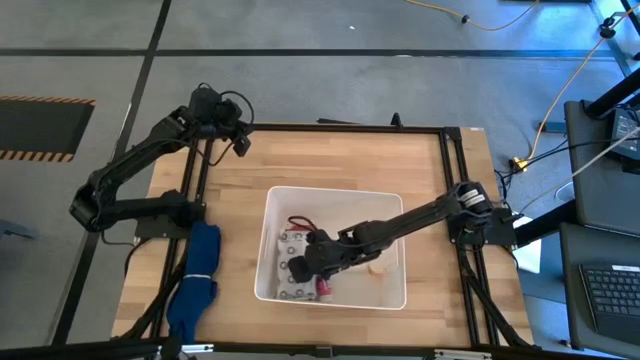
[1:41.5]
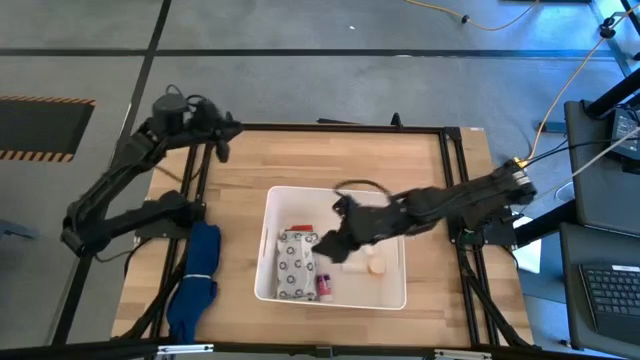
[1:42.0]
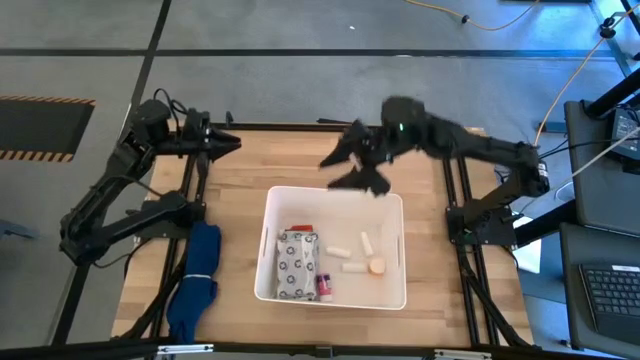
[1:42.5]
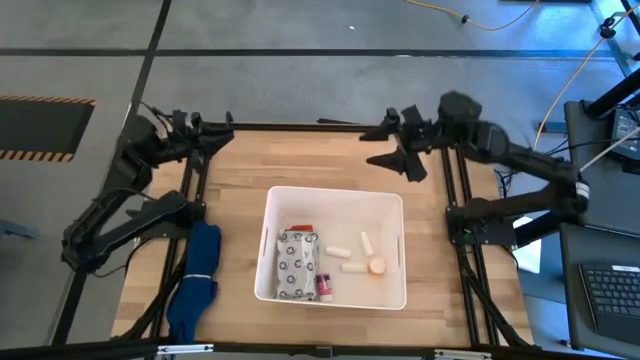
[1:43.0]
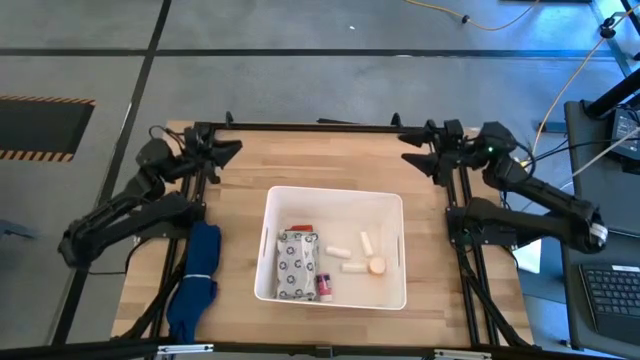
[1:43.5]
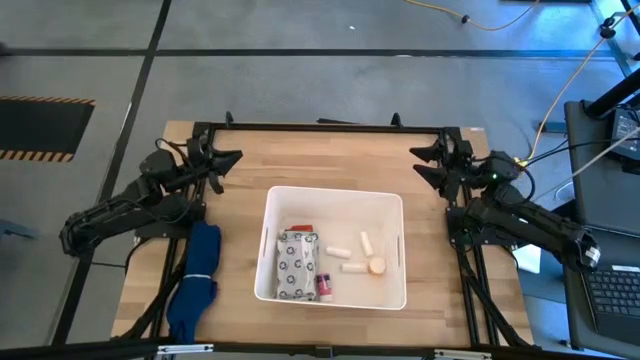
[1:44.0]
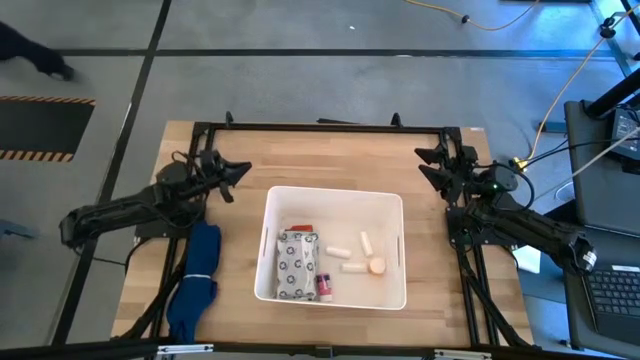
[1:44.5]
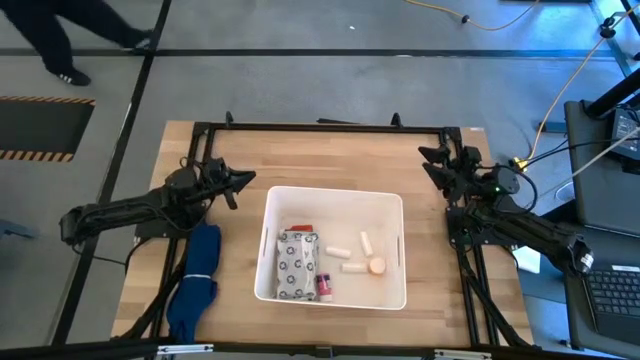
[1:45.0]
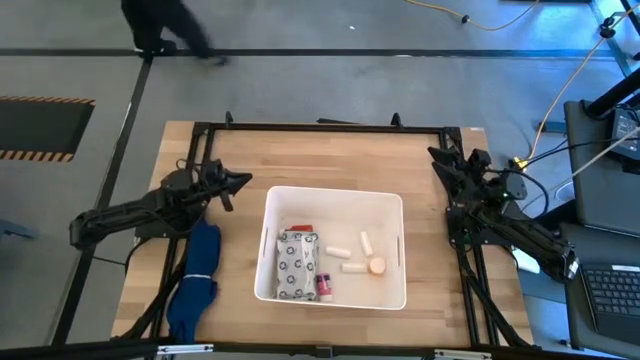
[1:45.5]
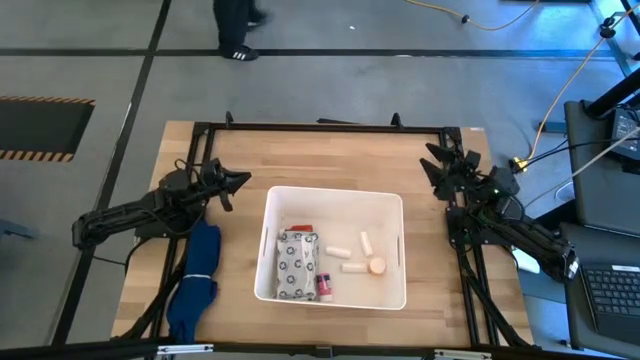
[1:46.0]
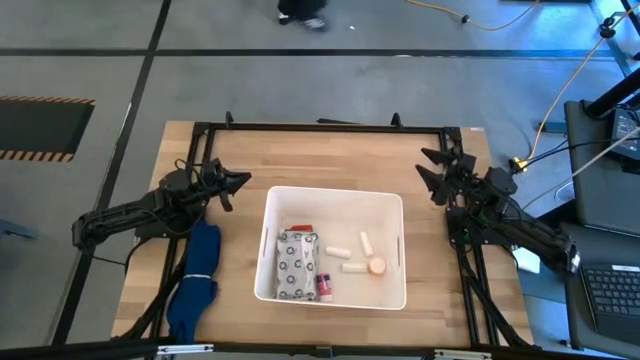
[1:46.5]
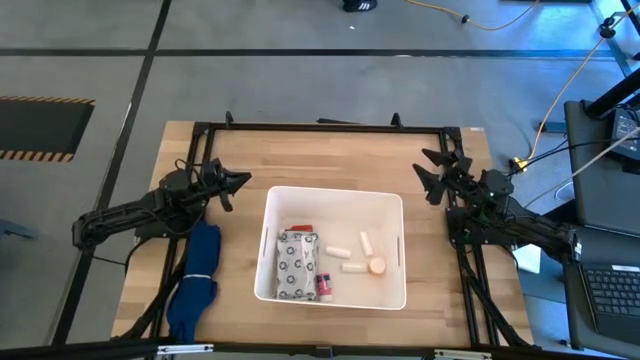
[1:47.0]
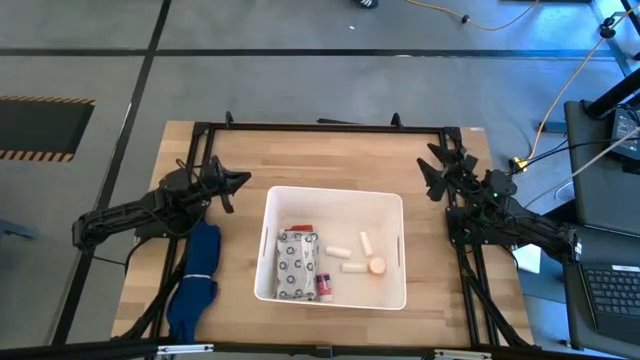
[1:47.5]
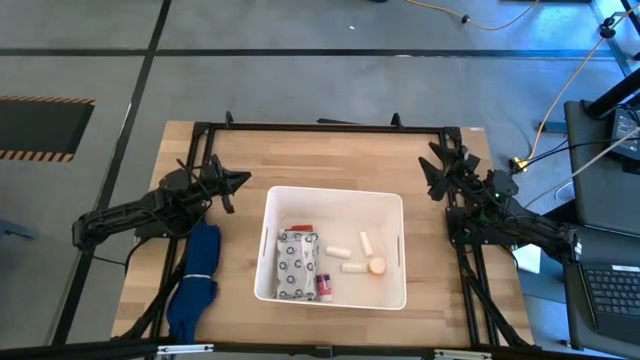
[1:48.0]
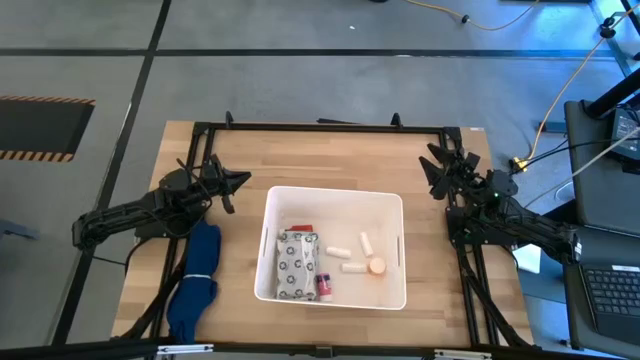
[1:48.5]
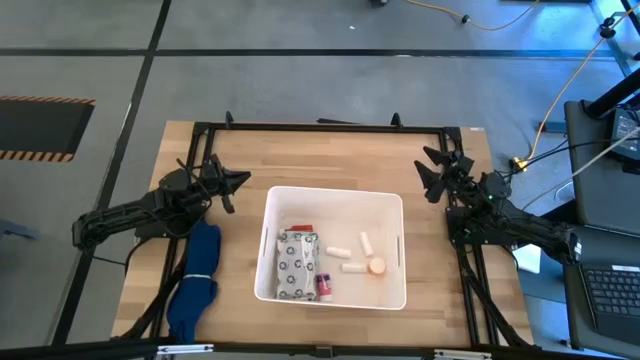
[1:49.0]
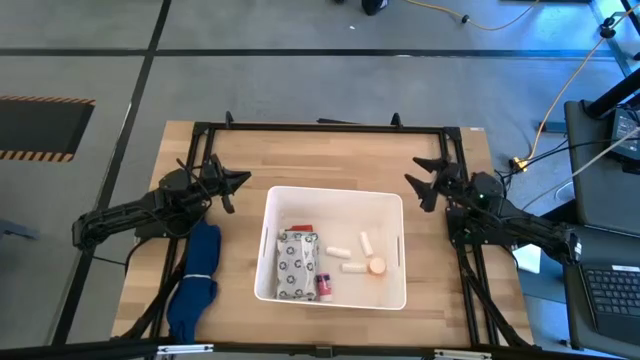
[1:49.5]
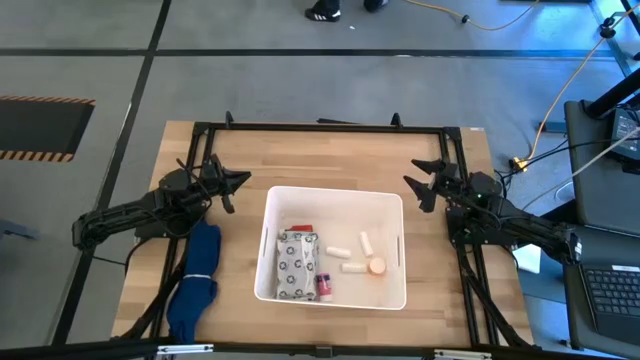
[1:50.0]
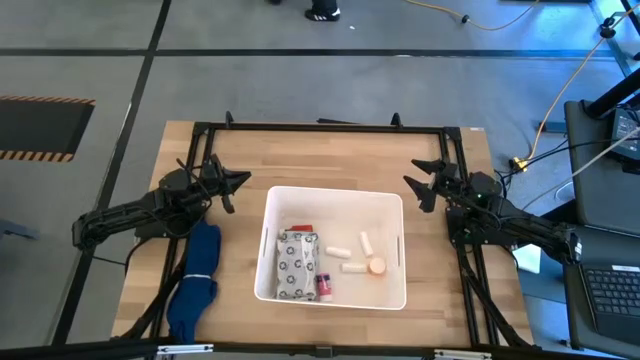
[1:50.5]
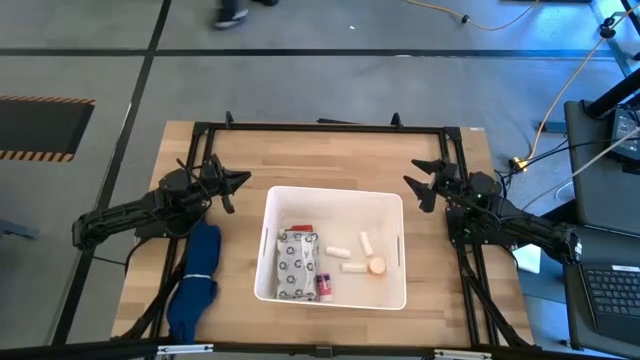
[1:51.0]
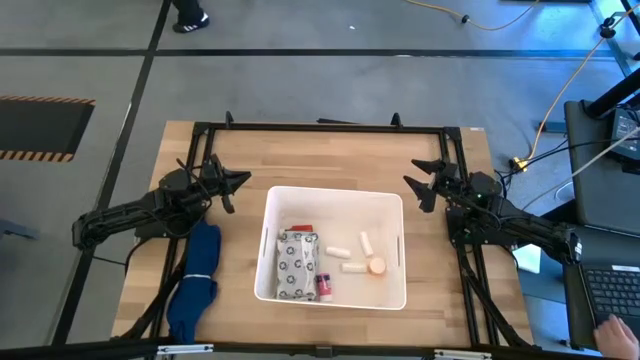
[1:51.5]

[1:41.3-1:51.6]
Task: Pick & place medical supplies in basket/bin
Return to Home Position

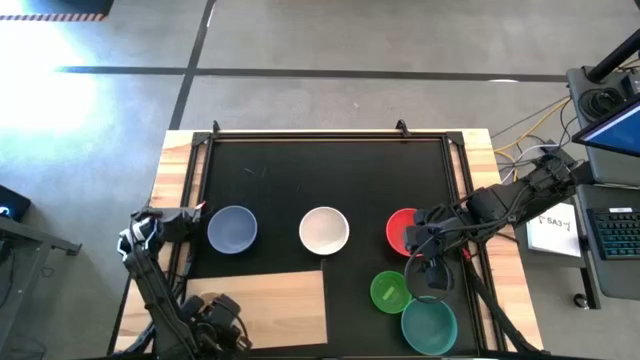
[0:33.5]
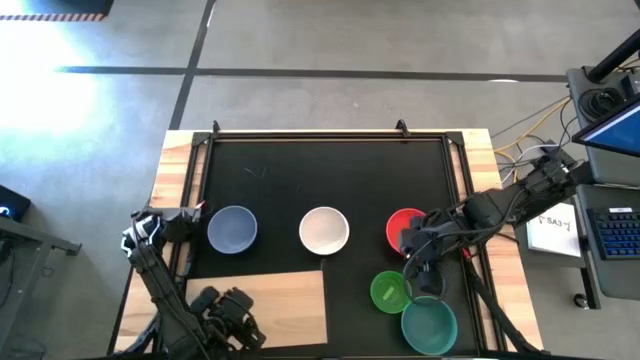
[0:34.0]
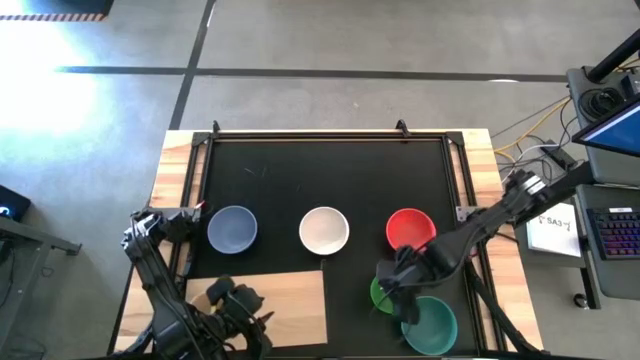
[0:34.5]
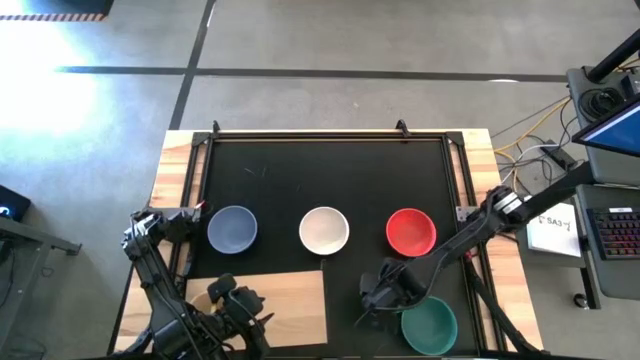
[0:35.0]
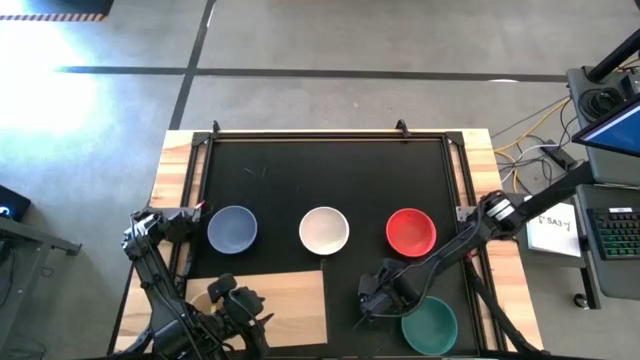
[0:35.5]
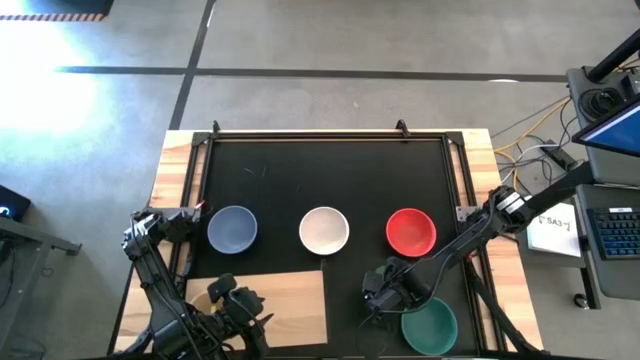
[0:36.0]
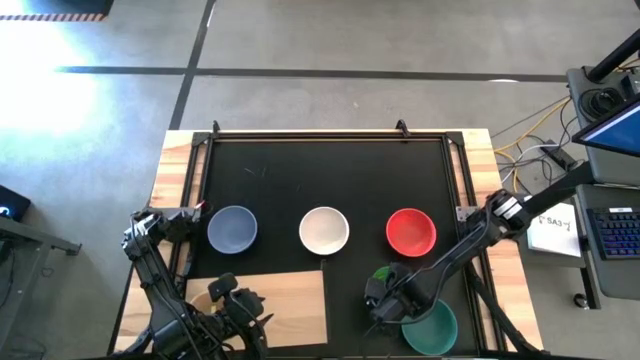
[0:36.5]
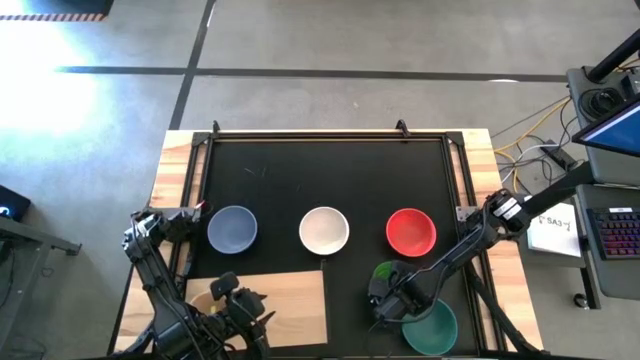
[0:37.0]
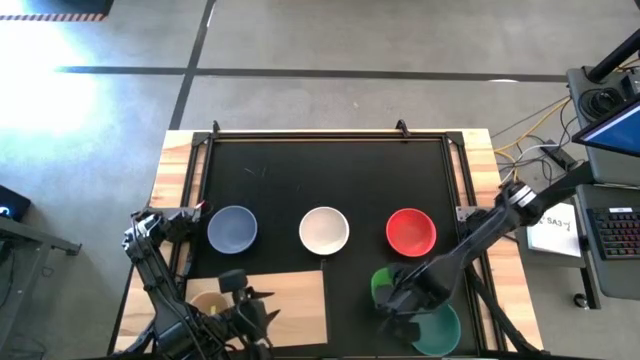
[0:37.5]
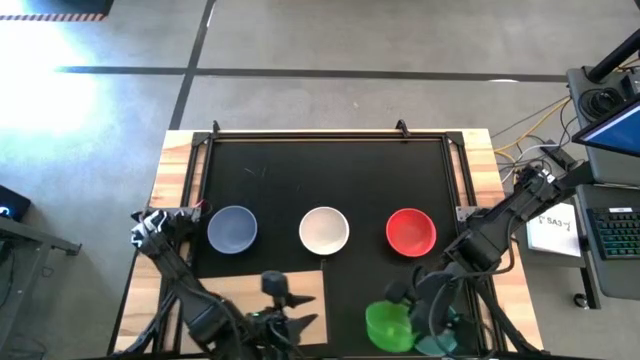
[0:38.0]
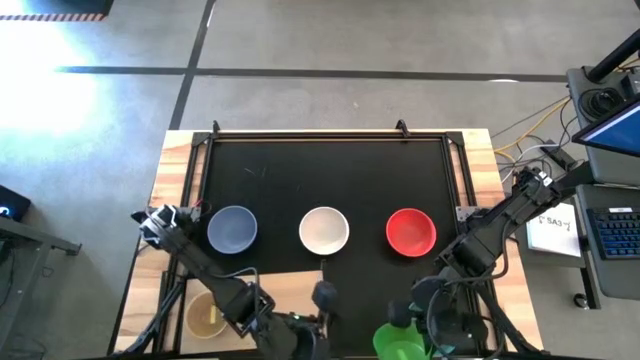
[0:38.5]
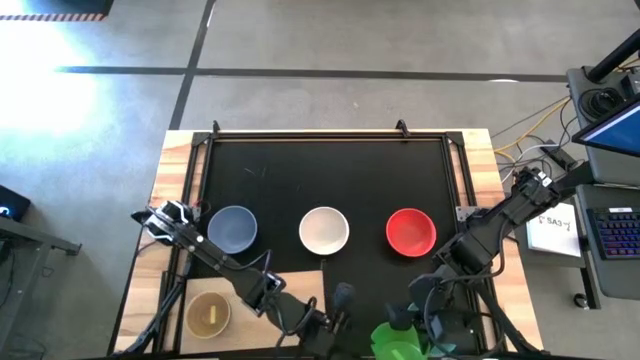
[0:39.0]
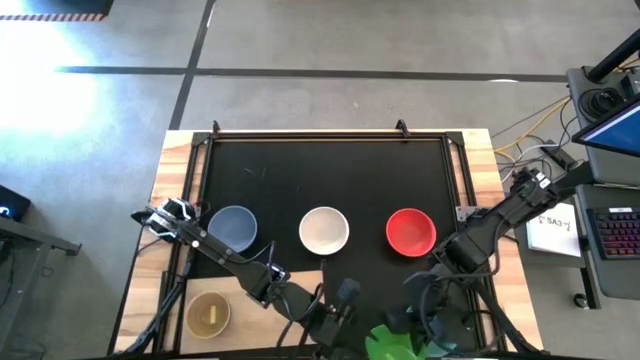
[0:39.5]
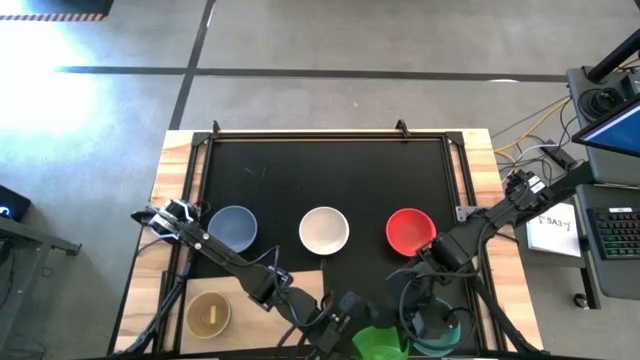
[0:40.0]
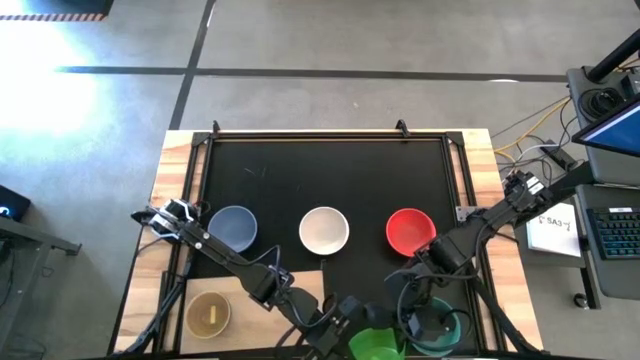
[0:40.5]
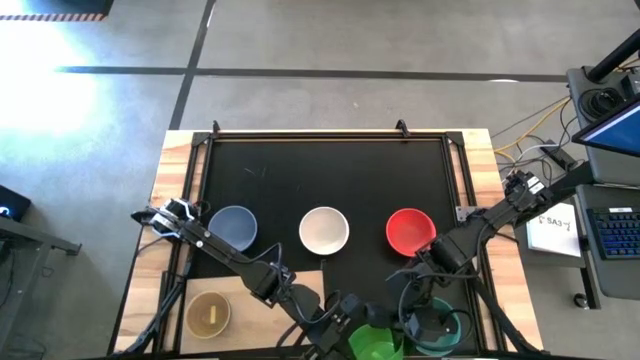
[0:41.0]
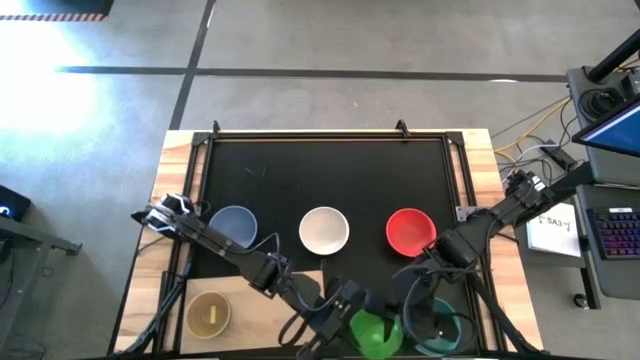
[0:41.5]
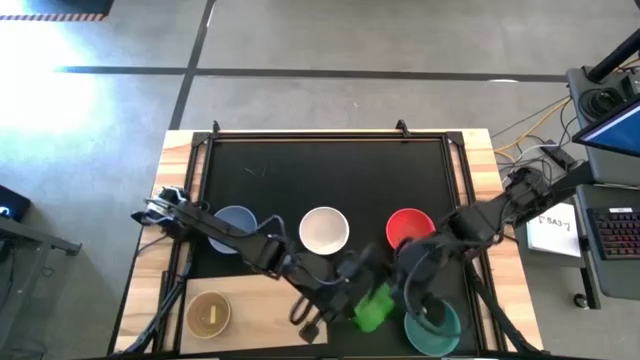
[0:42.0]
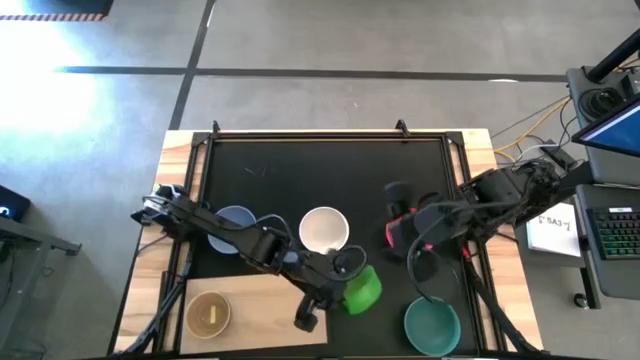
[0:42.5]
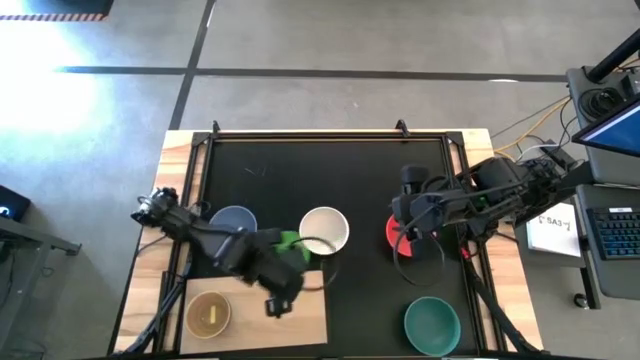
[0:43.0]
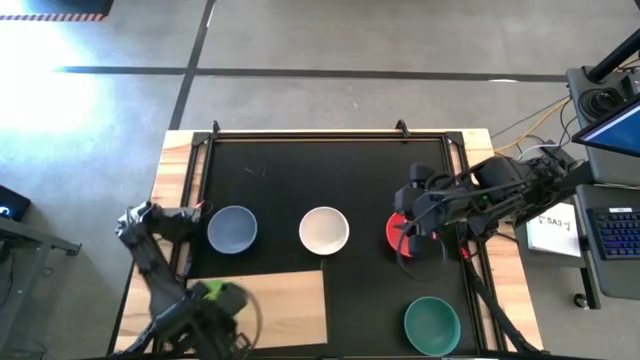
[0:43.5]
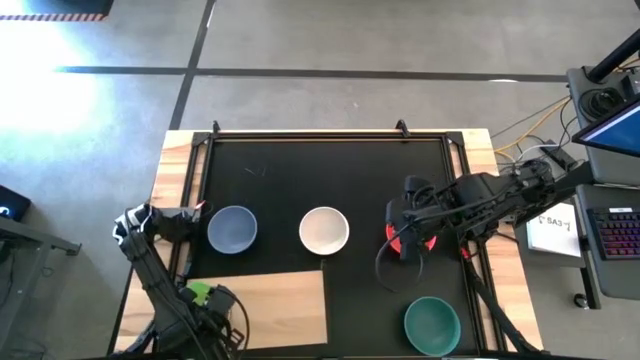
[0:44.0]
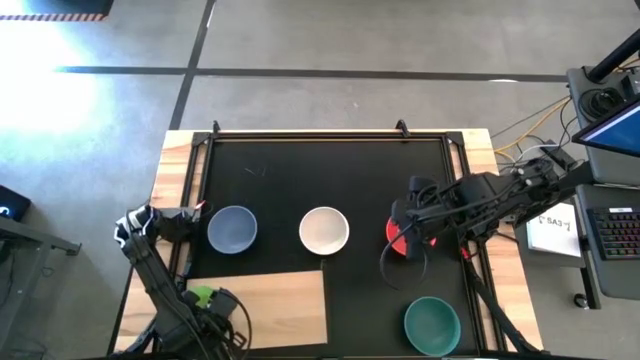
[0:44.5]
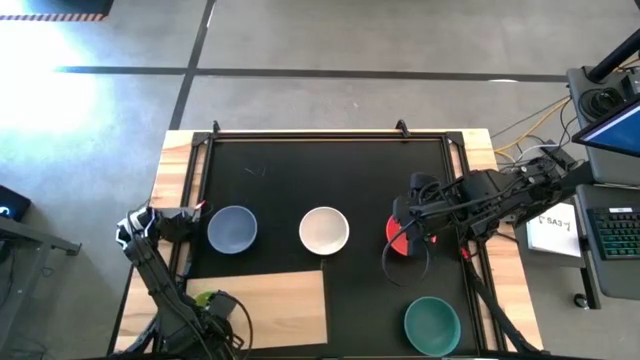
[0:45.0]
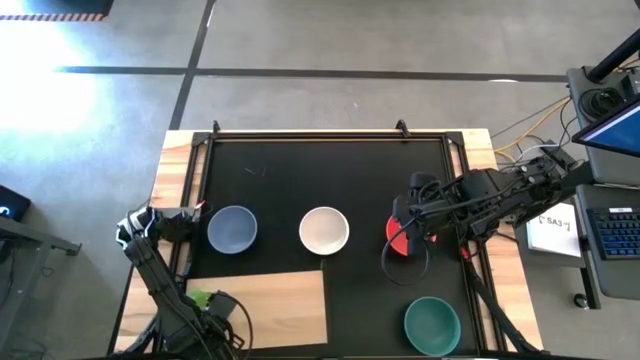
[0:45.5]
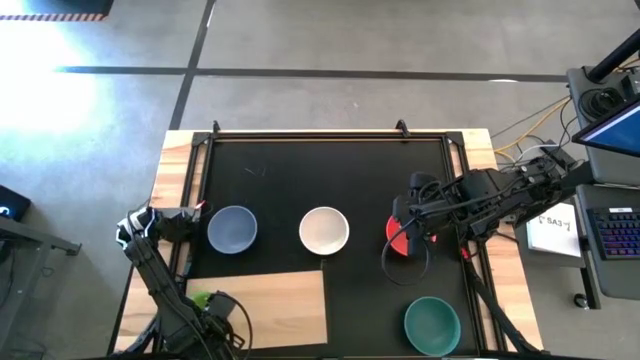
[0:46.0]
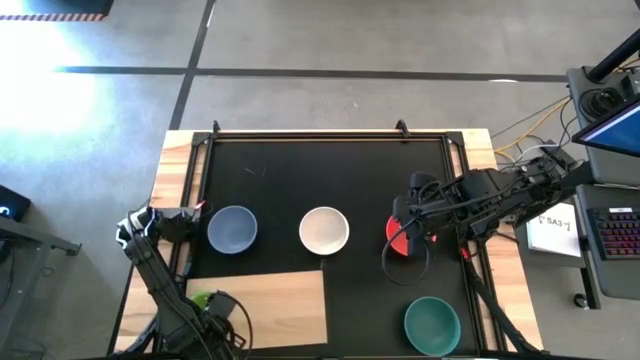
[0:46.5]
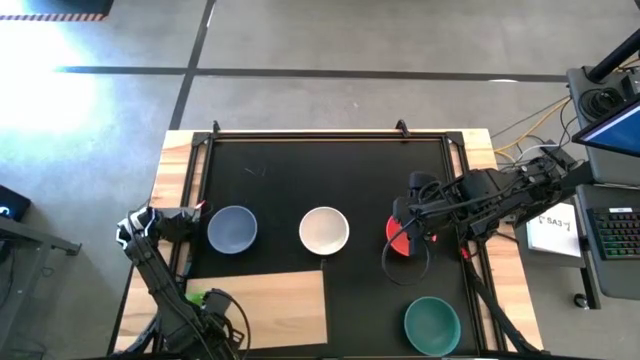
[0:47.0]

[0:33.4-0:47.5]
Task: Place and stack bowls onto a shelf
Stack the green bowl on top of the yellow bowl on the shelf
